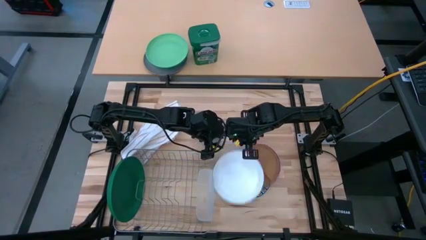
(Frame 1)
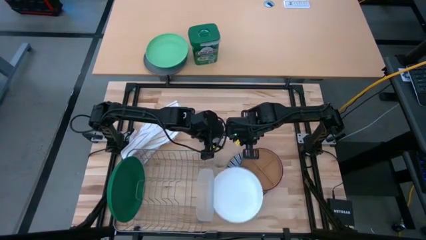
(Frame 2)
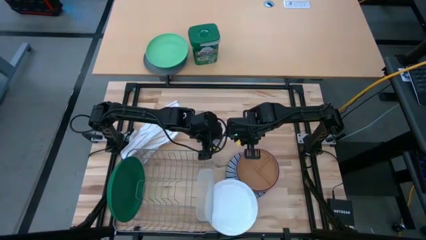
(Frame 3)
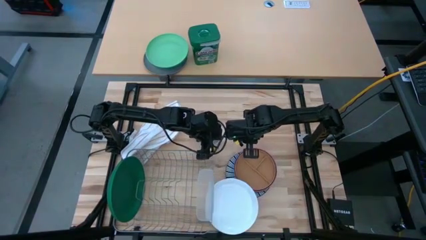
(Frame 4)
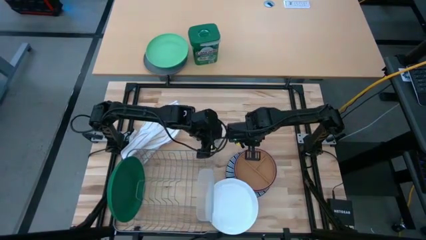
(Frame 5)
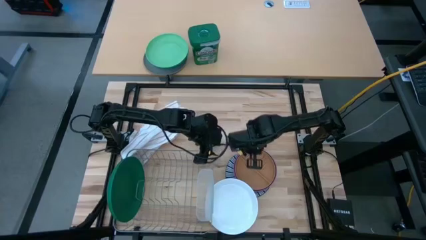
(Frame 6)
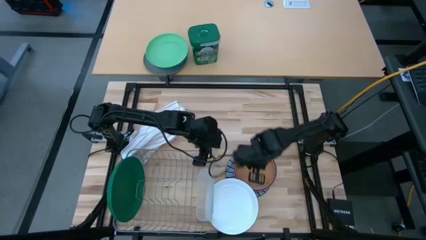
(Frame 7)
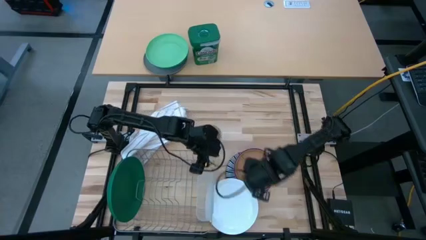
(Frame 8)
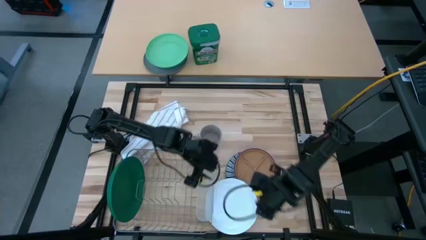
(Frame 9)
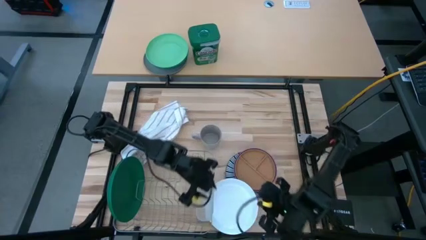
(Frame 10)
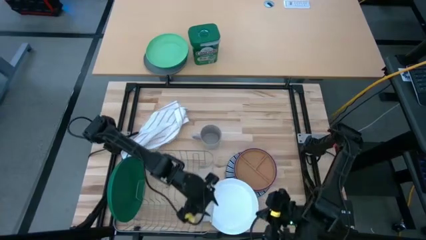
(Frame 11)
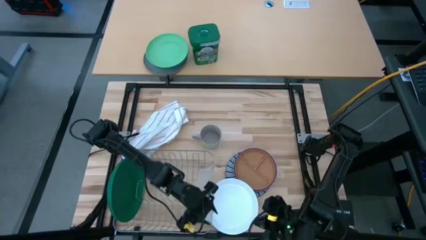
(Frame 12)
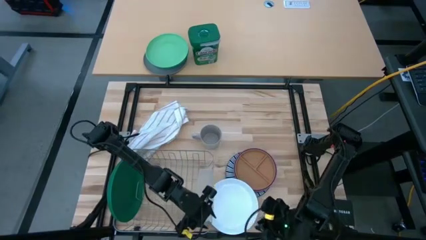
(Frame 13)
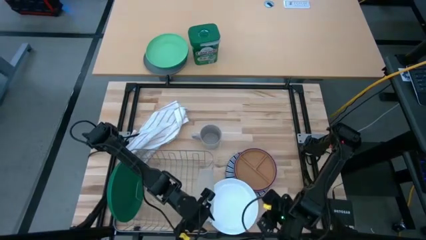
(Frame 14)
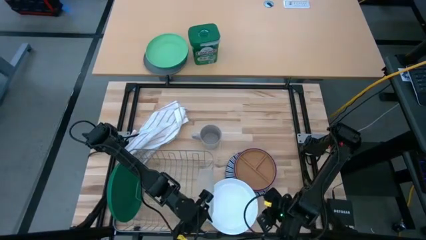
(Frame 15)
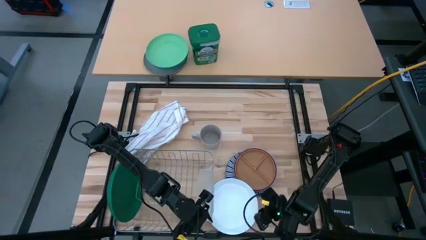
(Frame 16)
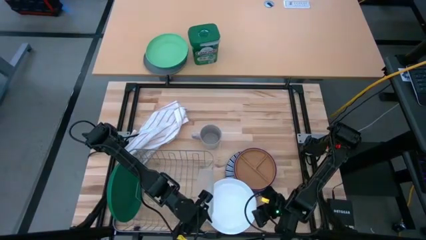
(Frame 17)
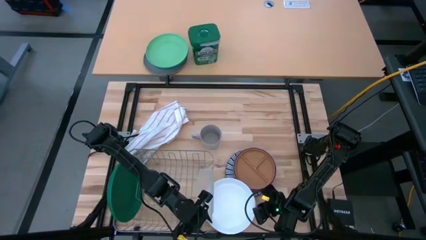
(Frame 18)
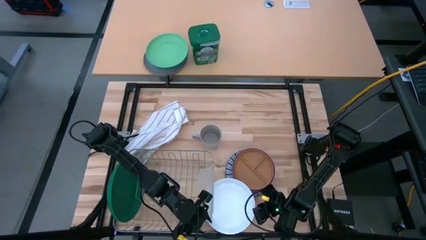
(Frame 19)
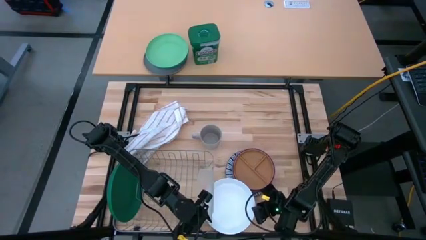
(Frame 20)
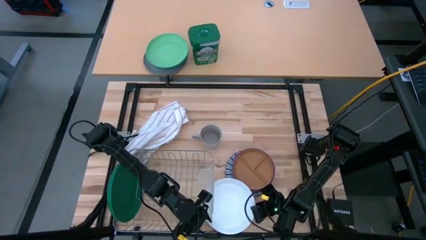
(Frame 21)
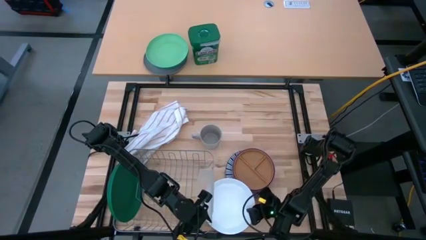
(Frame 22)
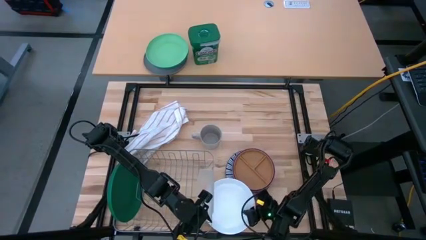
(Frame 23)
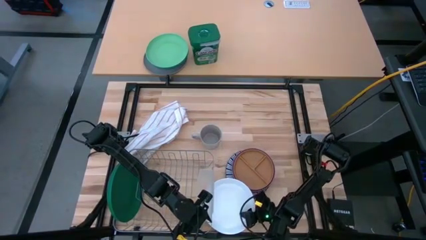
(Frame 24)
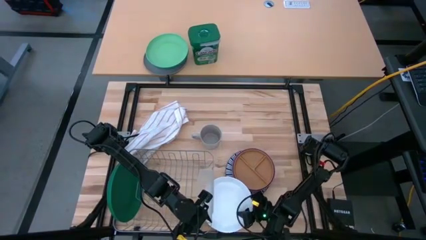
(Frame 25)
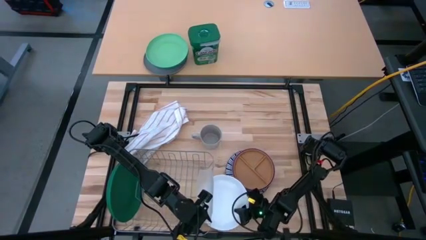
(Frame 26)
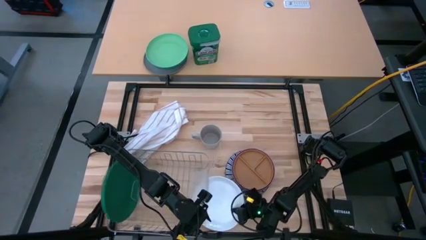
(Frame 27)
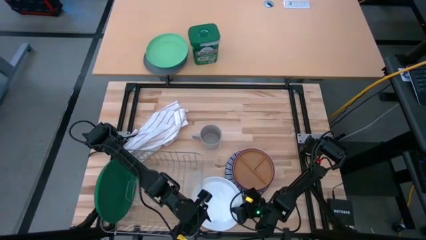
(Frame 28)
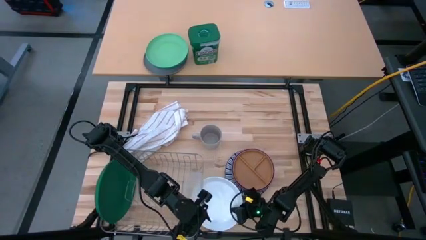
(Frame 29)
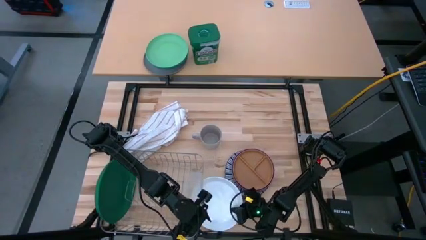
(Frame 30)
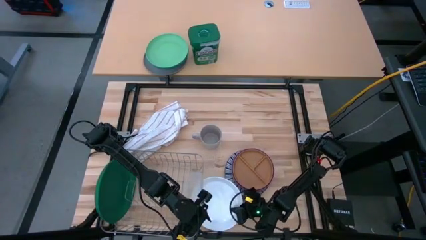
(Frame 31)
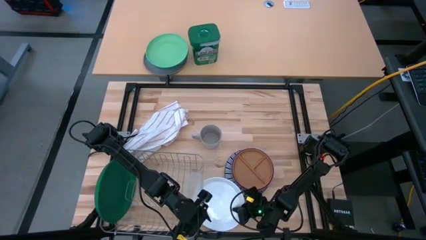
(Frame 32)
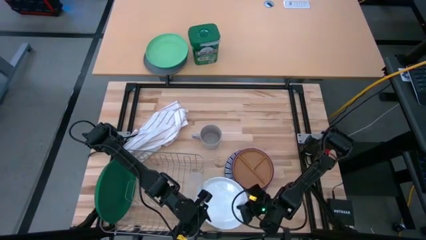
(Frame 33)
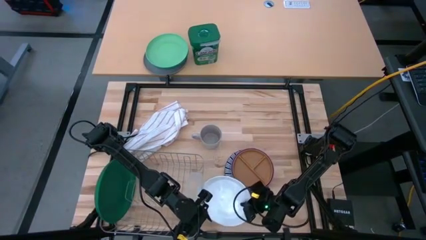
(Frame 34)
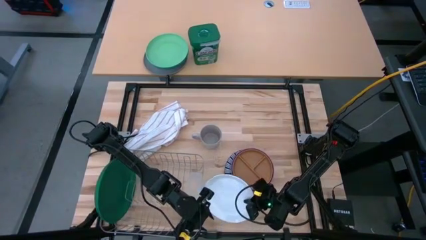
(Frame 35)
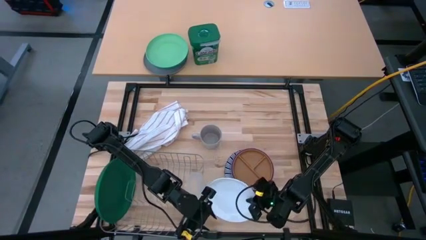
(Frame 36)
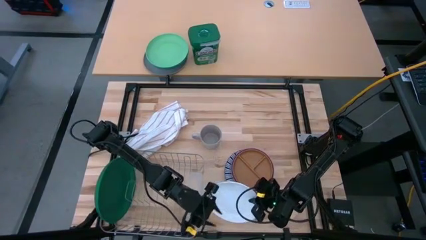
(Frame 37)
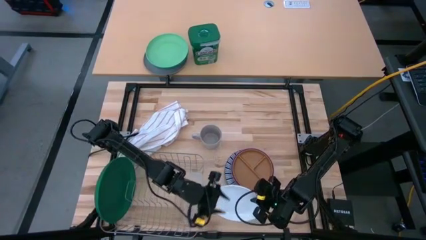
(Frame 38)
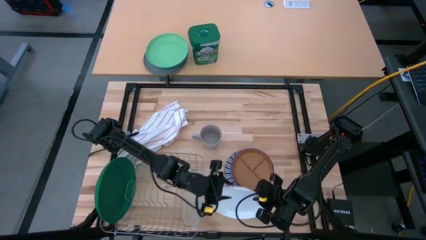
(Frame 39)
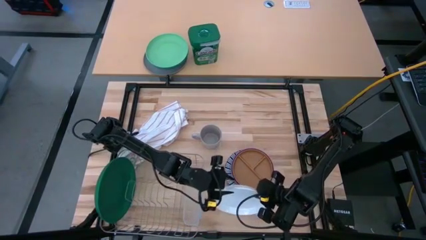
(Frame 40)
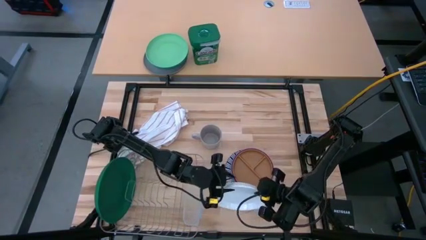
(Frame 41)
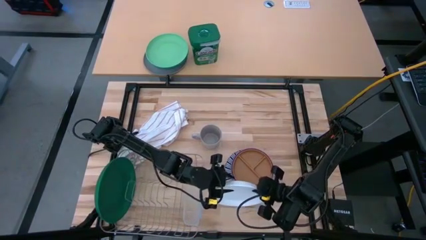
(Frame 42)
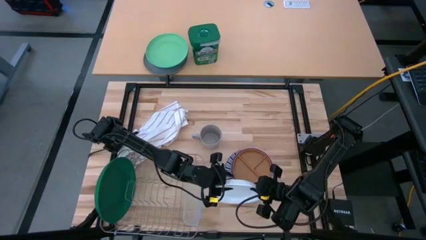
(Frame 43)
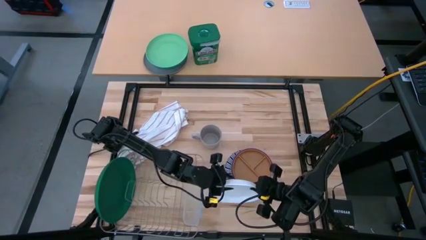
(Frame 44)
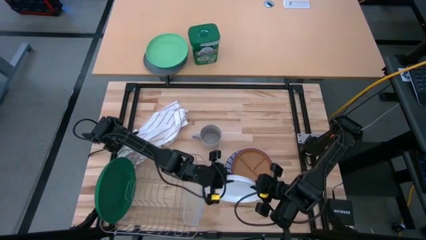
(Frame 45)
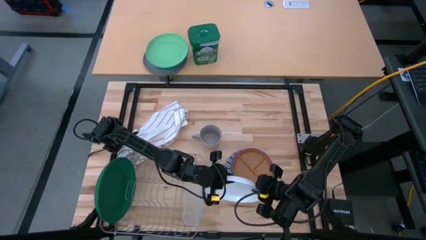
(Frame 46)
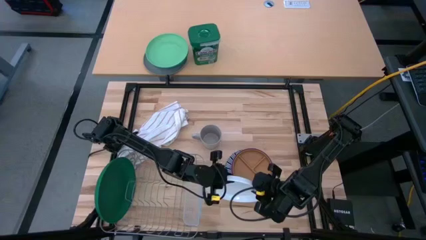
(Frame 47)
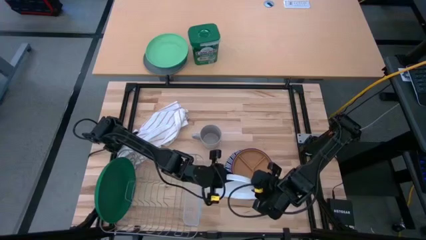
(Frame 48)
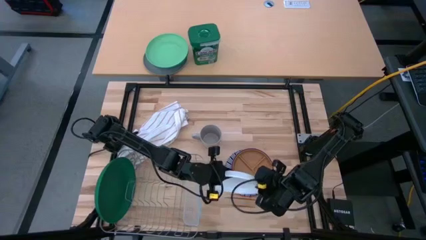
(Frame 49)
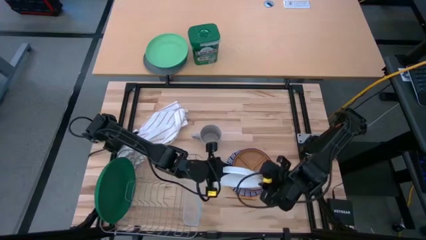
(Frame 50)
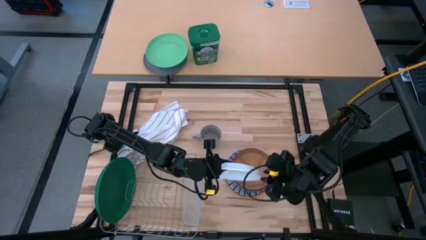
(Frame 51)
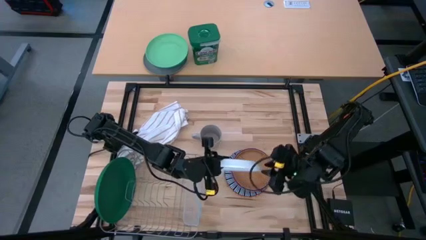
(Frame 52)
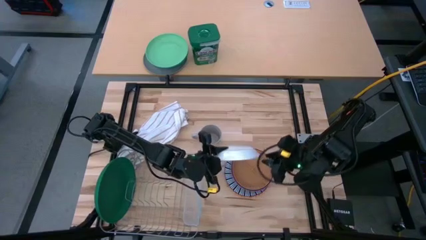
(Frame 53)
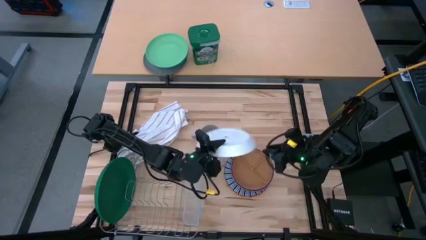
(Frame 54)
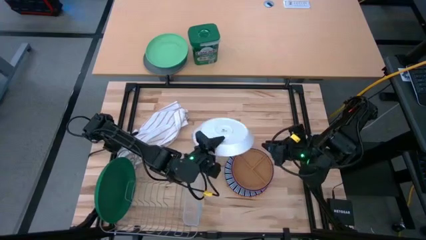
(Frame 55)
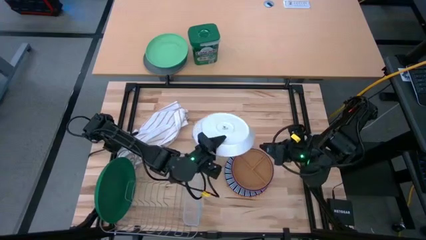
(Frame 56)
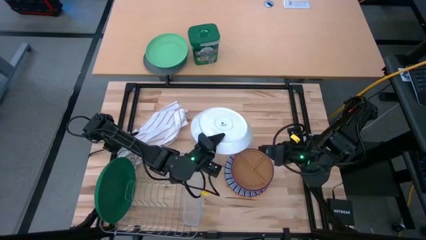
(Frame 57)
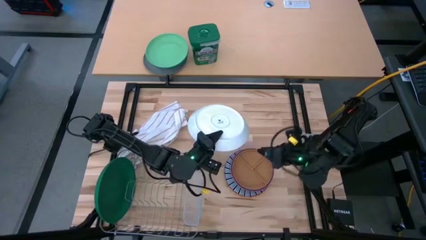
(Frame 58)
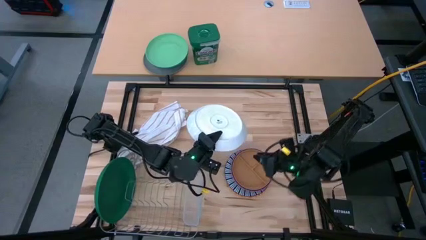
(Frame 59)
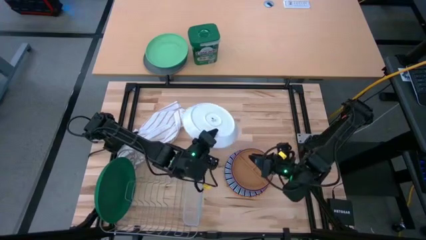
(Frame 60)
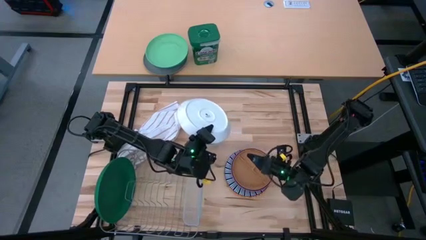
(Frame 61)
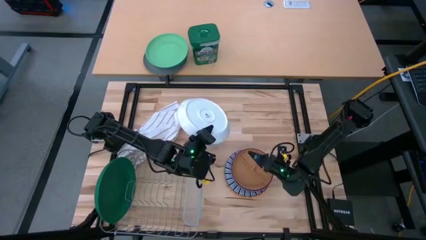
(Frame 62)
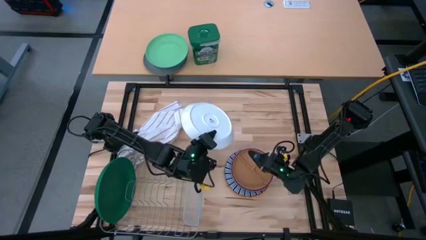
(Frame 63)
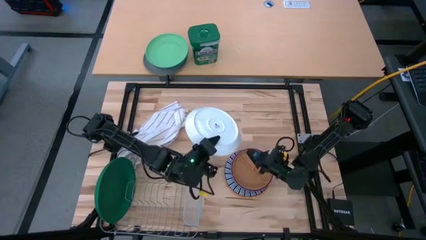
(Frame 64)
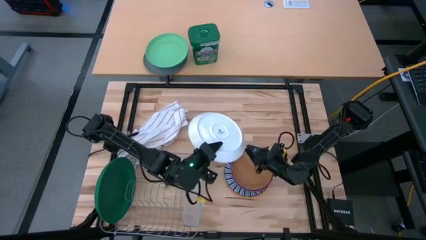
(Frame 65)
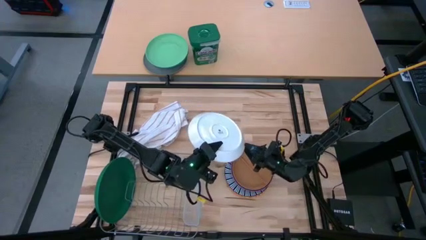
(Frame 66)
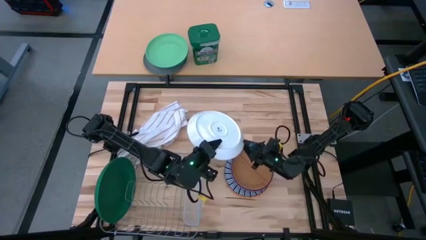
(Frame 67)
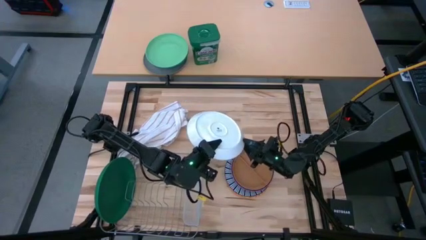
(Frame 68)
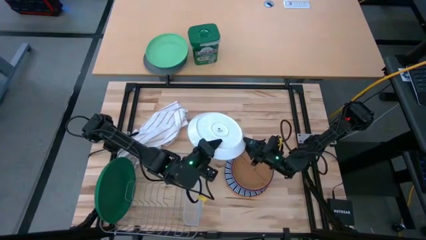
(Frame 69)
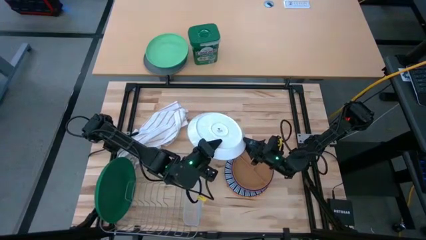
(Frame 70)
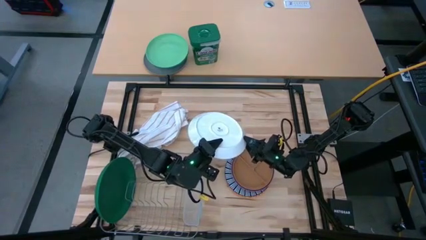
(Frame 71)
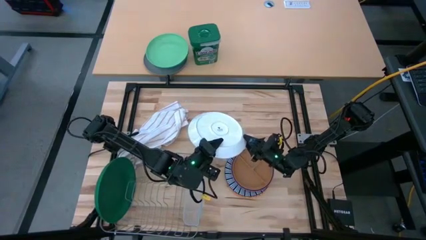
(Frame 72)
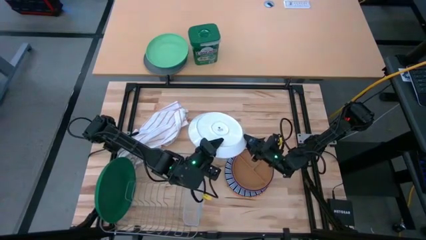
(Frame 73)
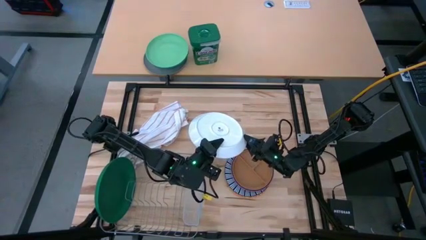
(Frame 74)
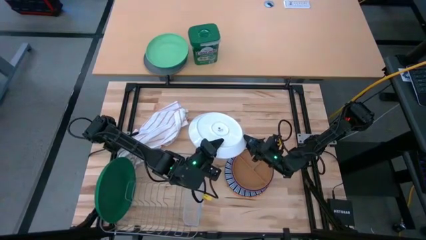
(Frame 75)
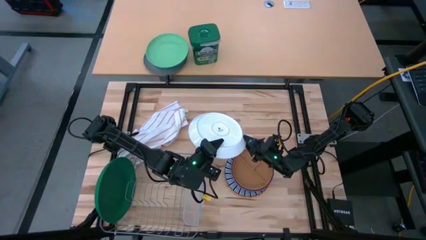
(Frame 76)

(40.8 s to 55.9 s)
Task: Sort dishes
Put the white plate into the dish rack
